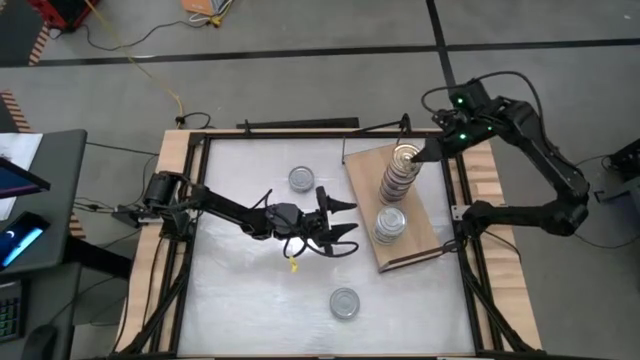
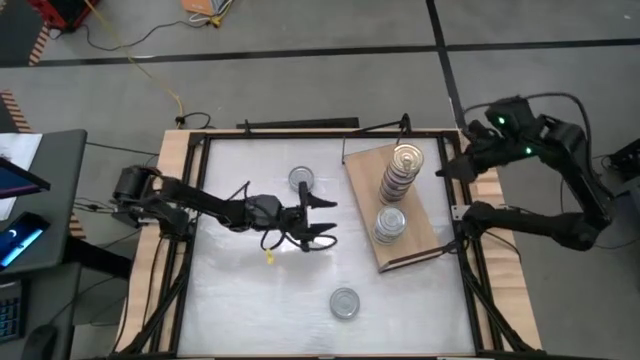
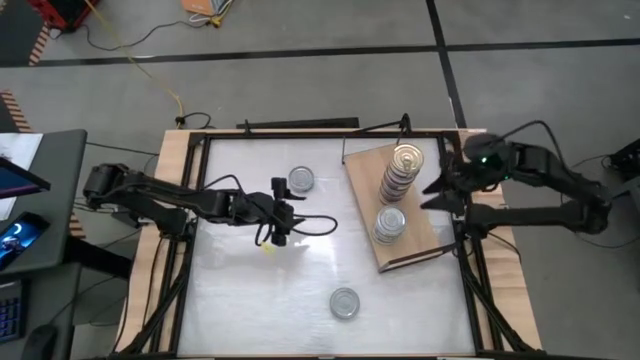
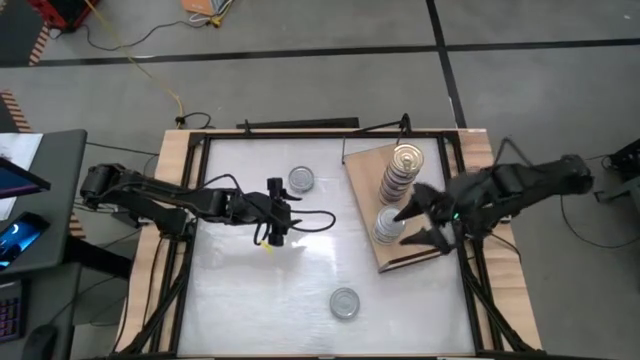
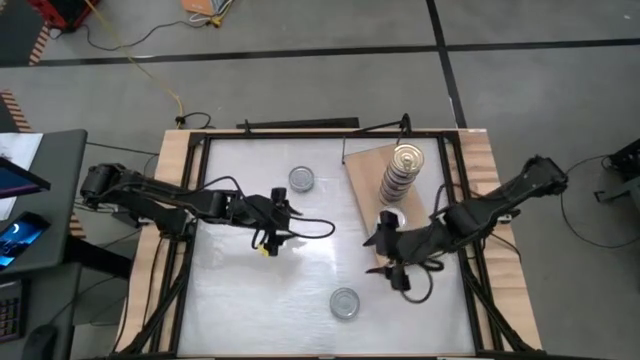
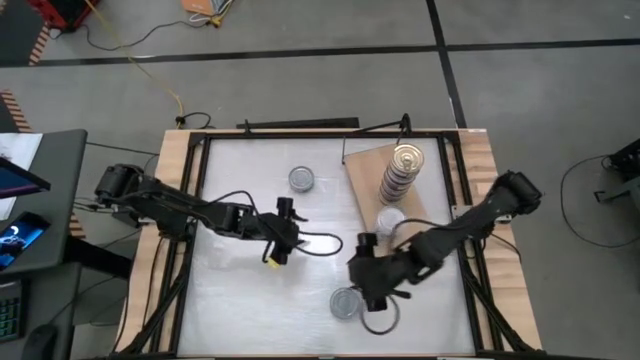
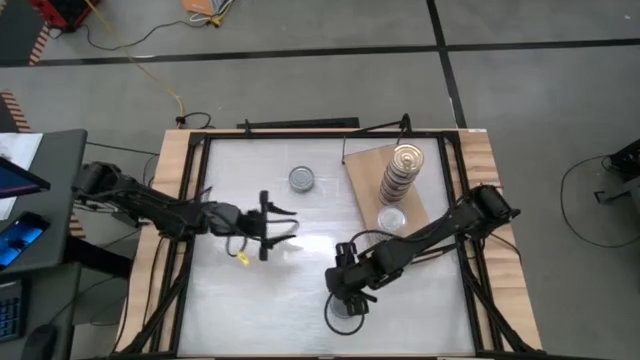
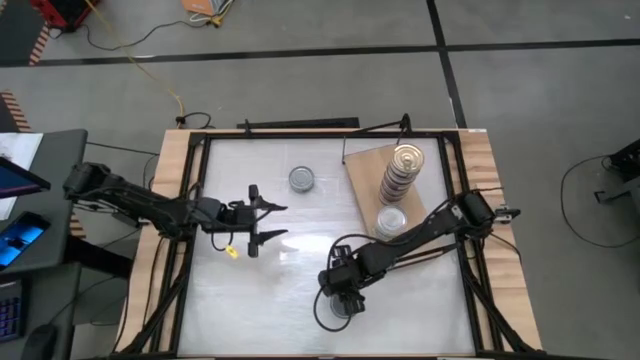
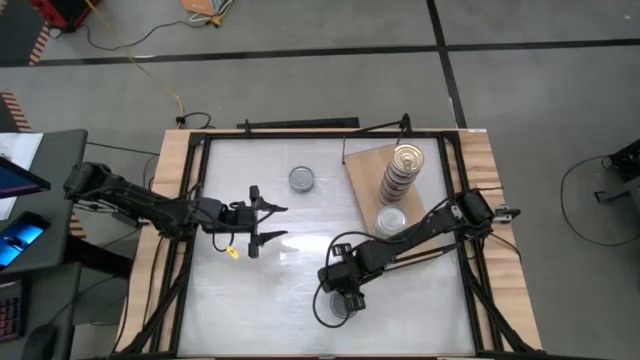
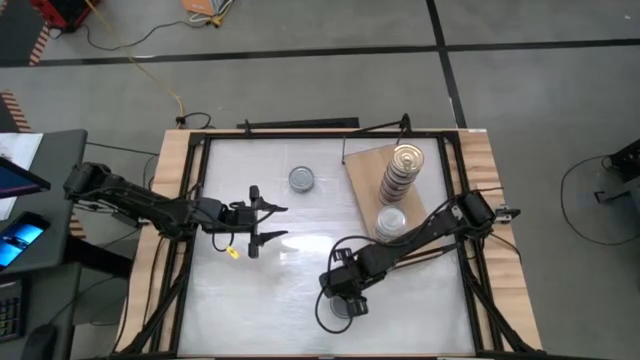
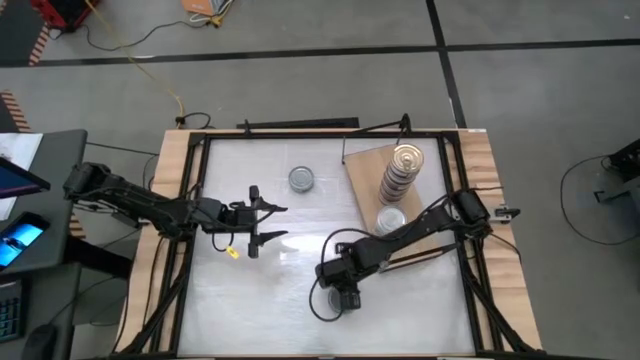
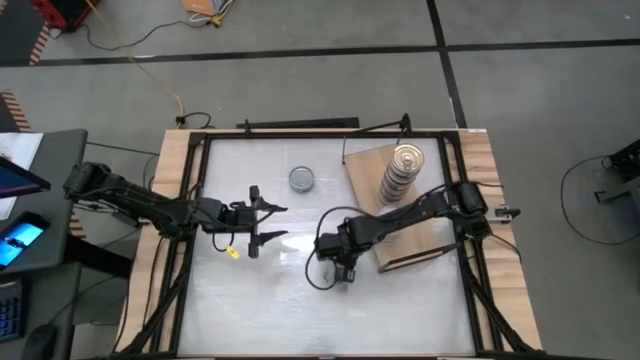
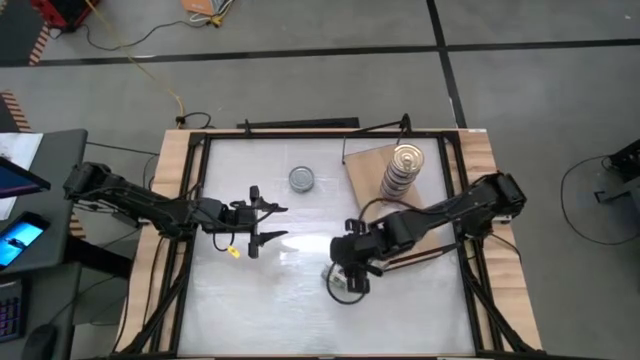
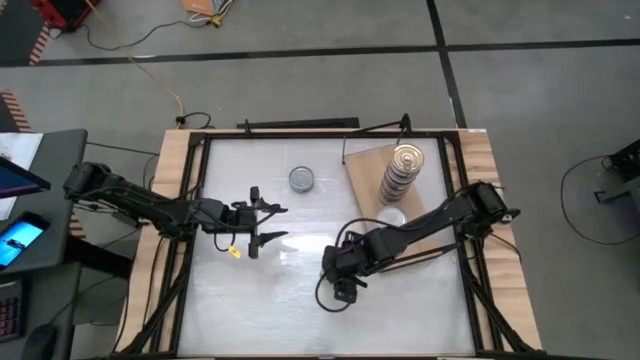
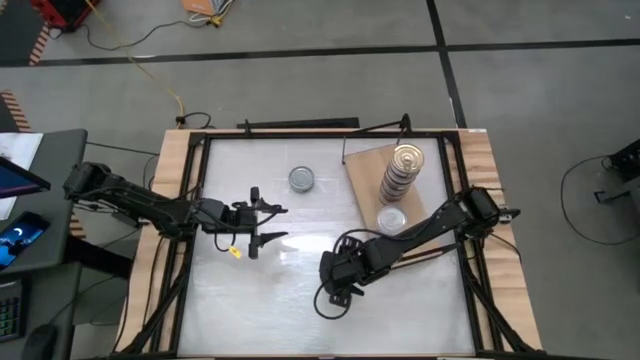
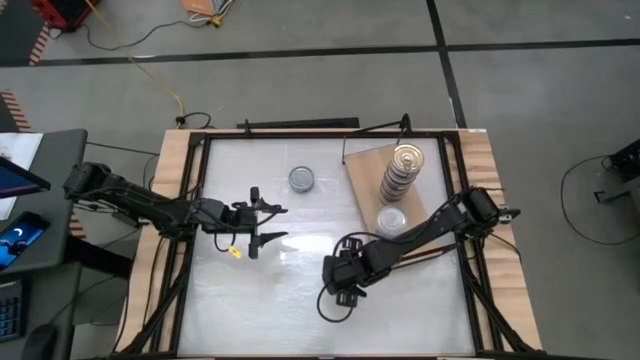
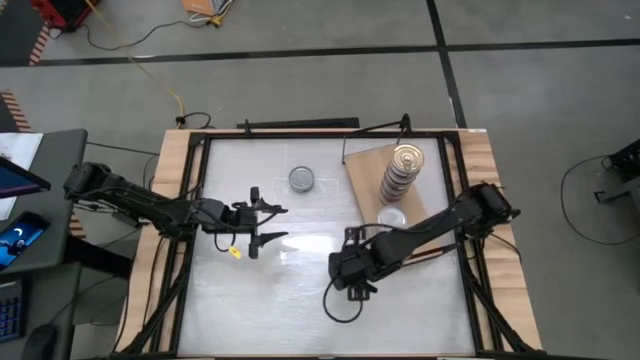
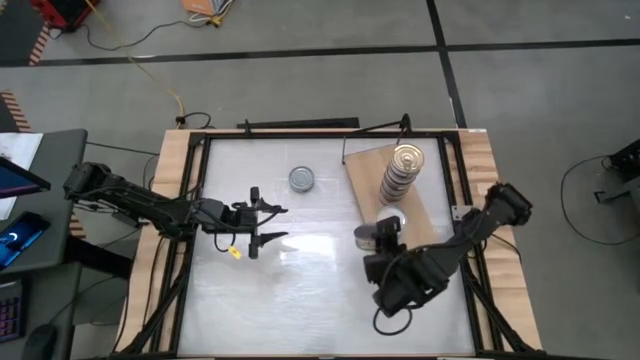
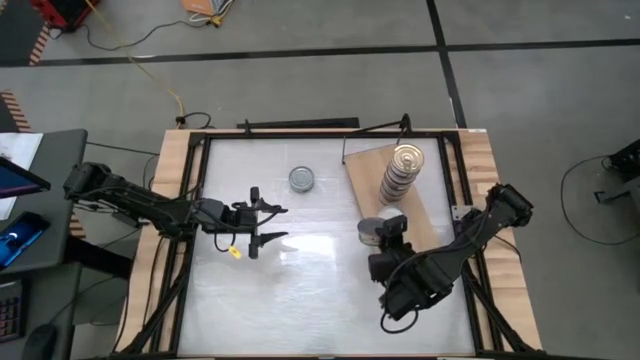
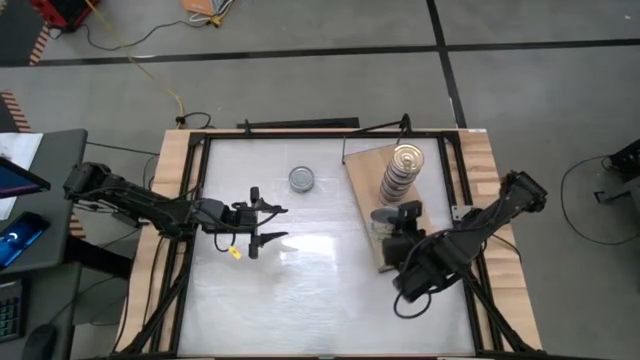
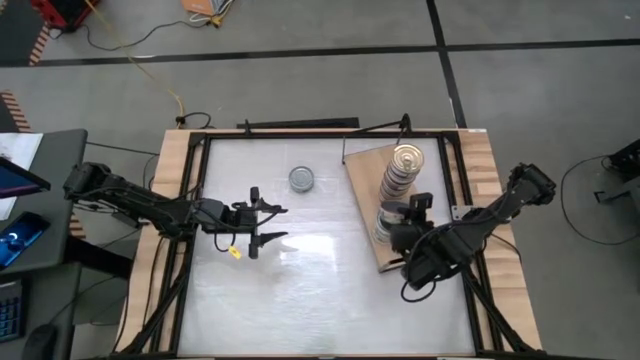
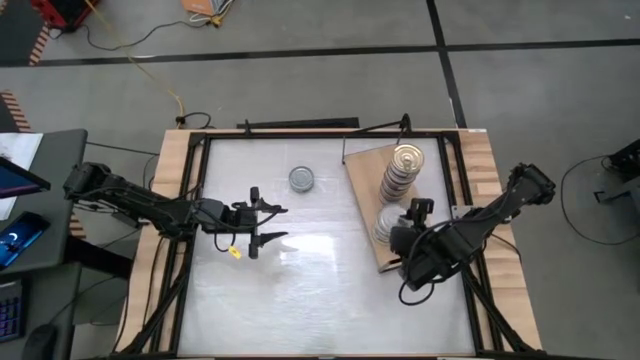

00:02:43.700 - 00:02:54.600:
Task: Stack canned seafood by type on shelf
Stack the green tuna can on the green tuna can on the shelf

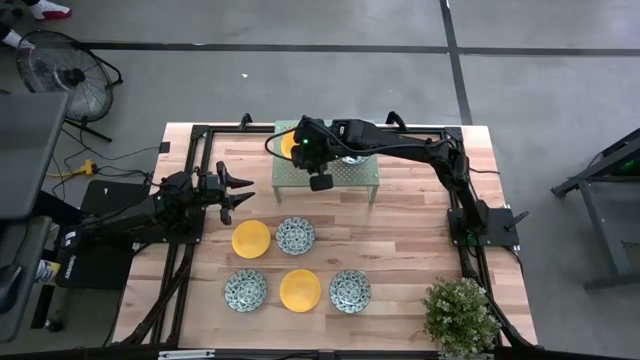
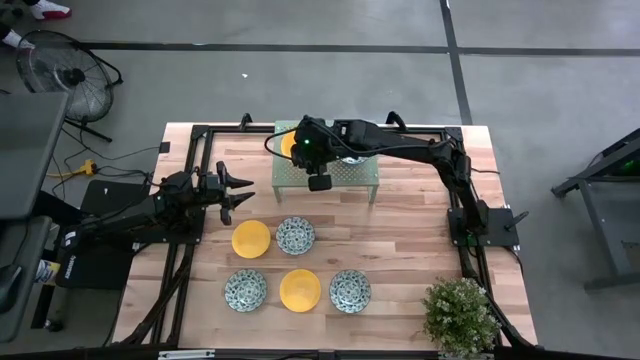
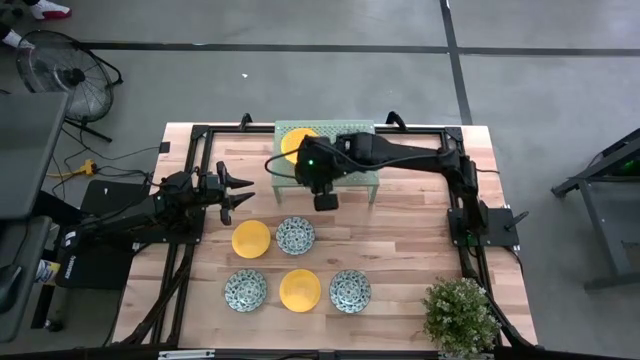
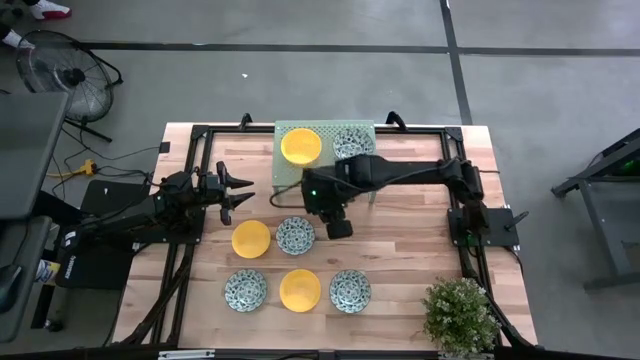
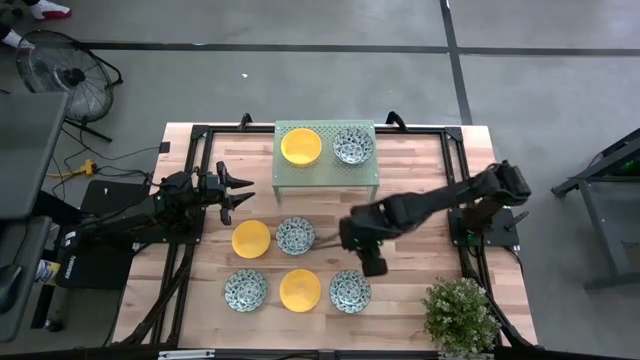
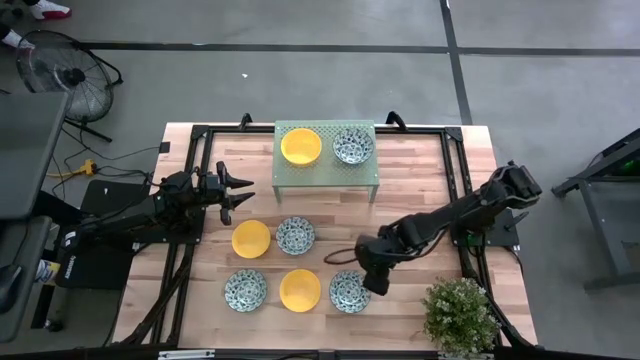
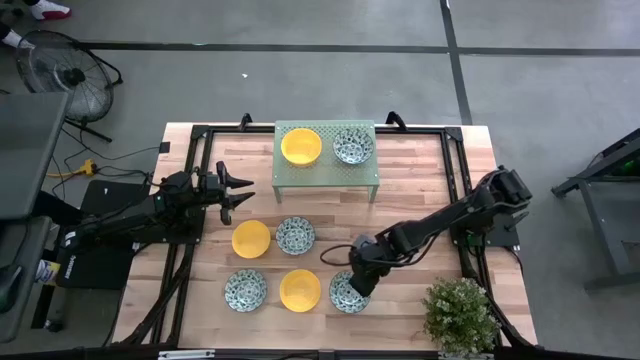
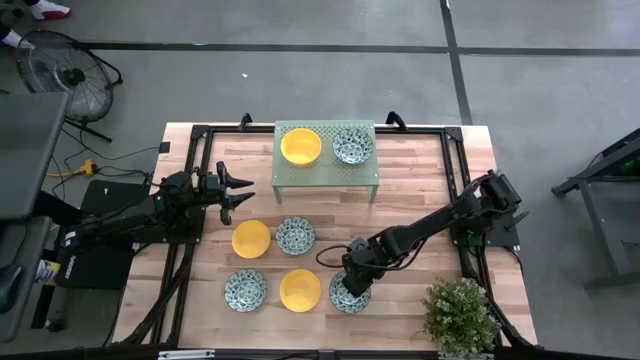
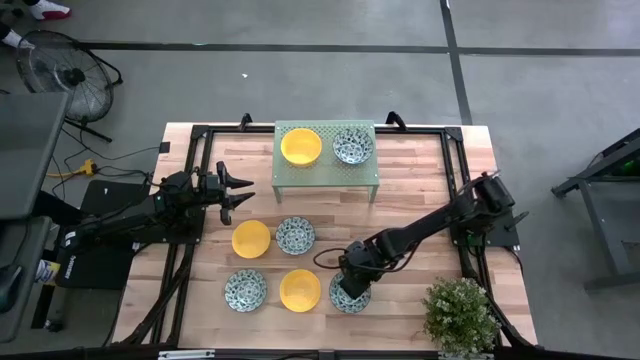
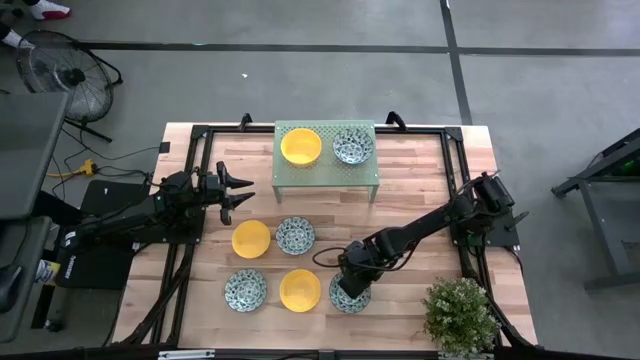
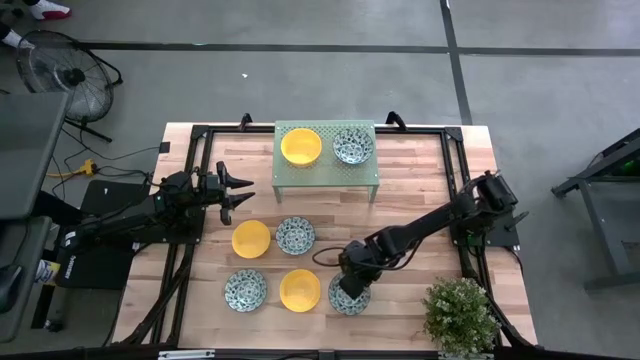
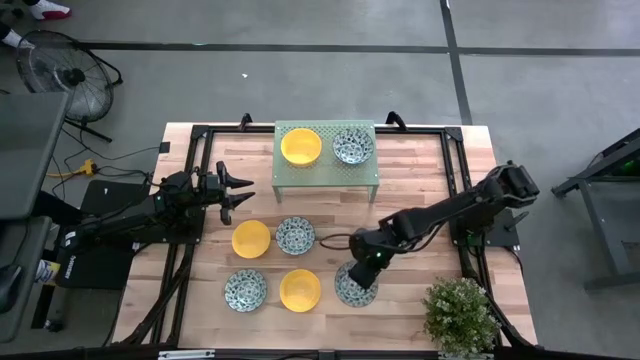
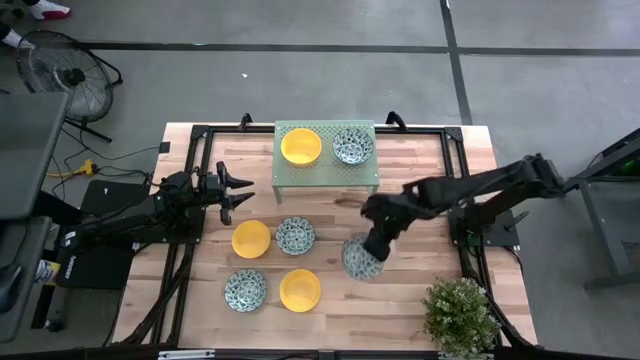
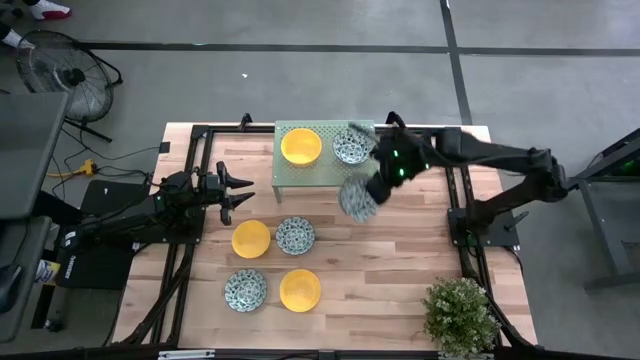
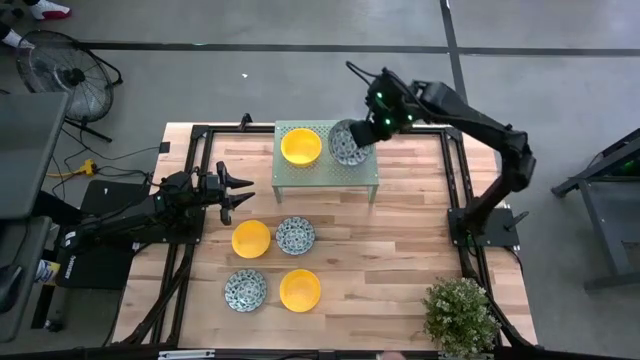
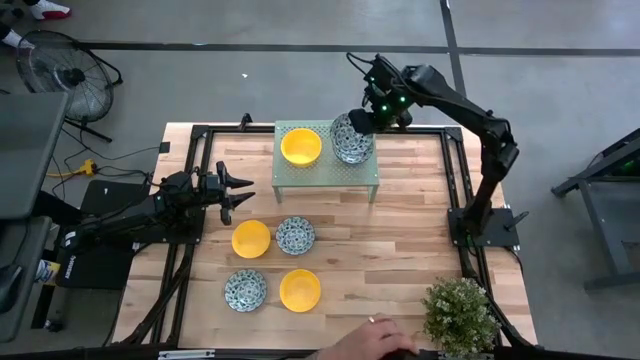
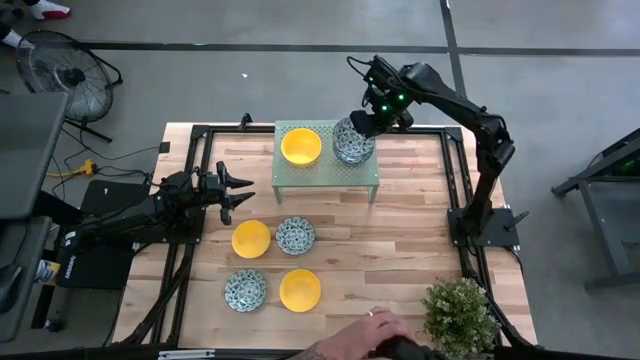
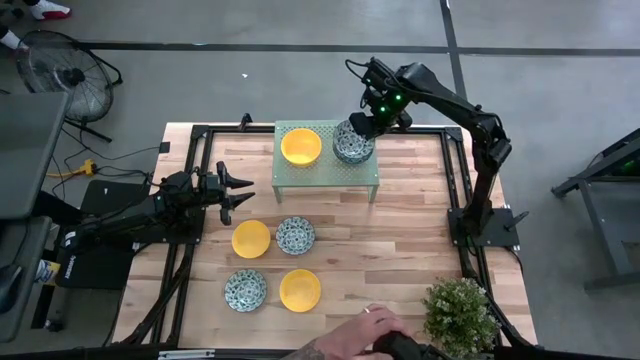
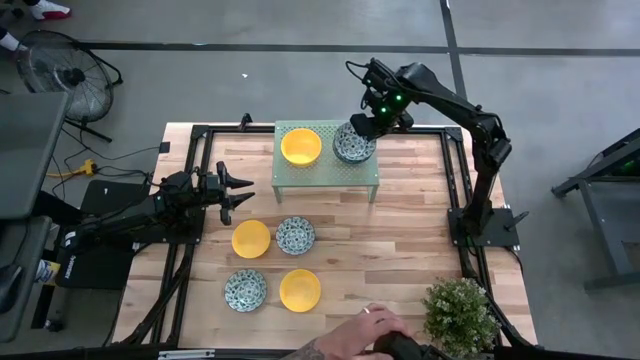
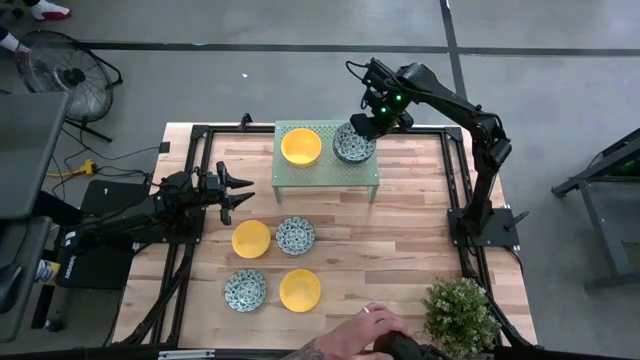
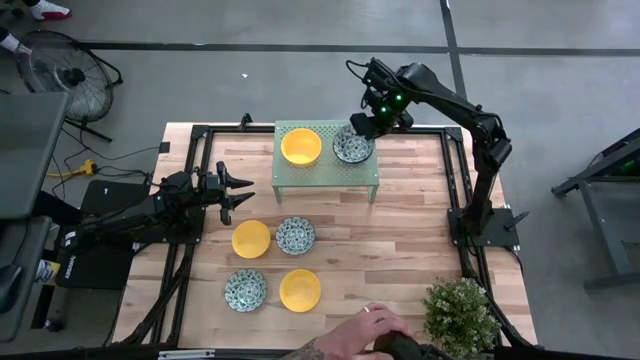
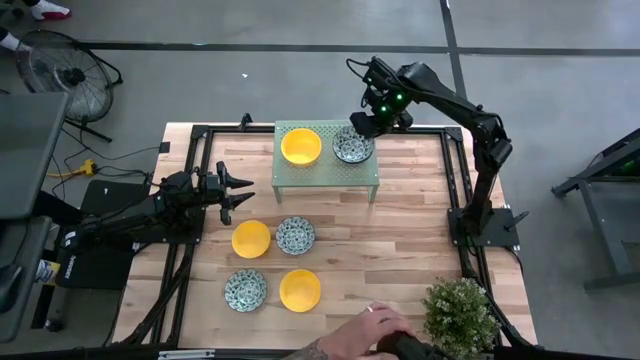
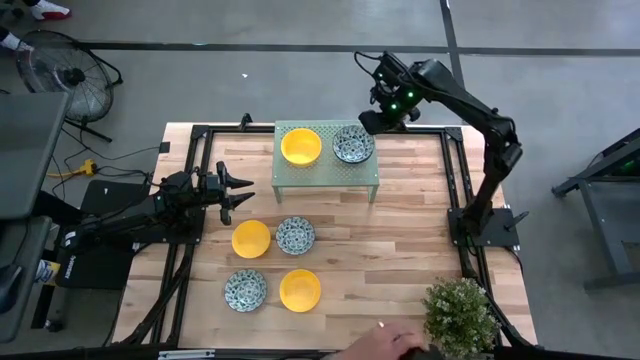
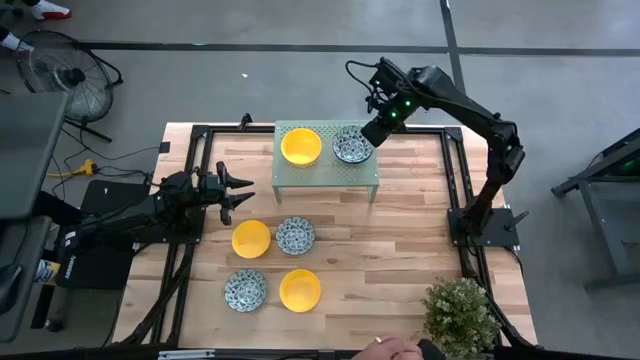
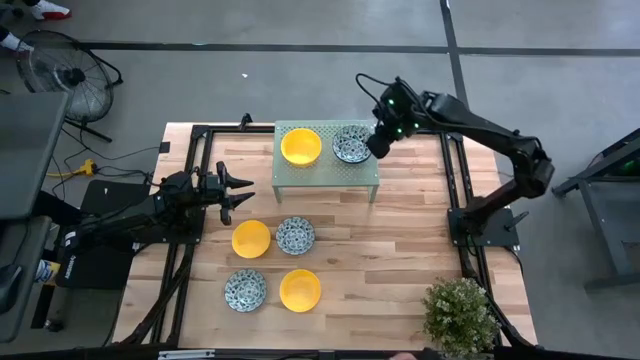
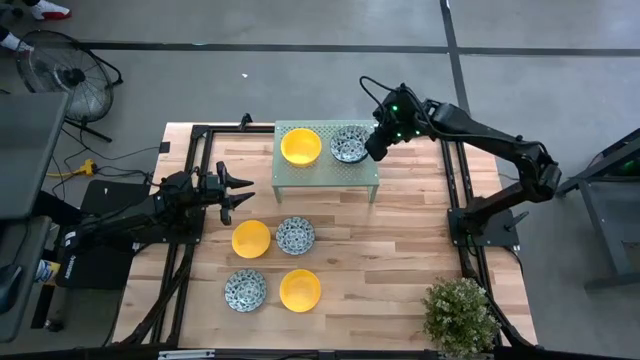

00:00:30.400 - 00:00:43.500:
Task: Pick & Place Mini bowls
Stack the blue patterned bowl on the blue bowl on the shelf
